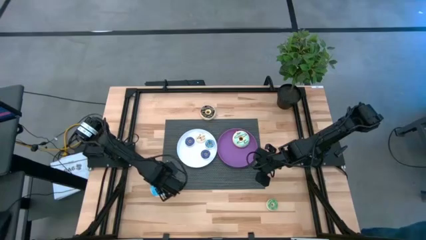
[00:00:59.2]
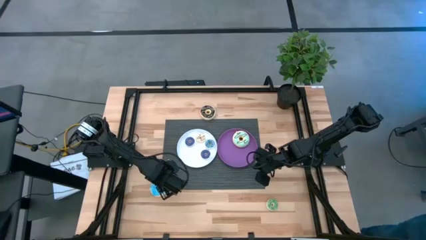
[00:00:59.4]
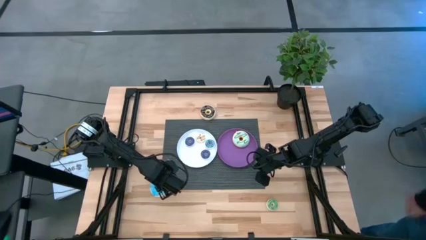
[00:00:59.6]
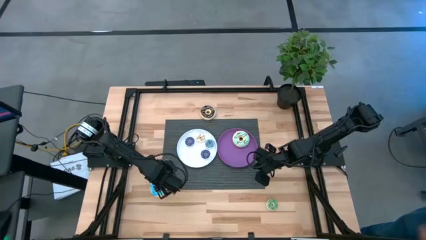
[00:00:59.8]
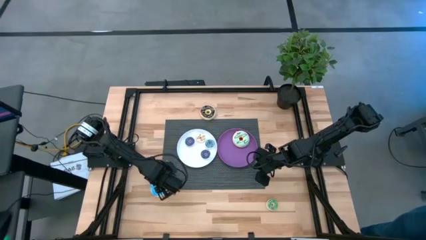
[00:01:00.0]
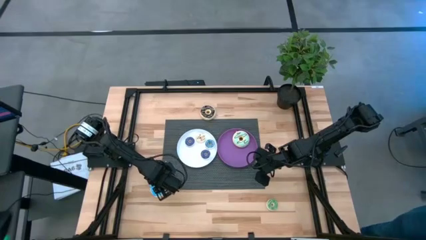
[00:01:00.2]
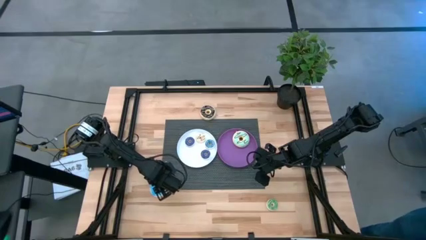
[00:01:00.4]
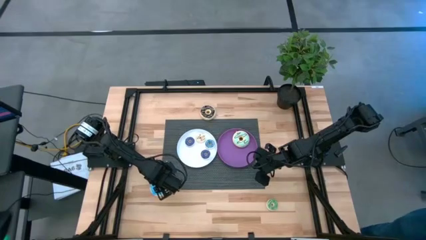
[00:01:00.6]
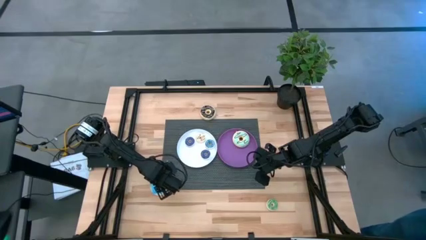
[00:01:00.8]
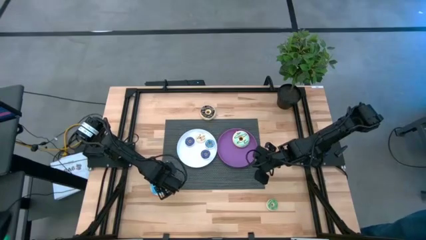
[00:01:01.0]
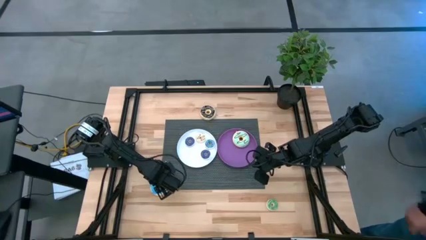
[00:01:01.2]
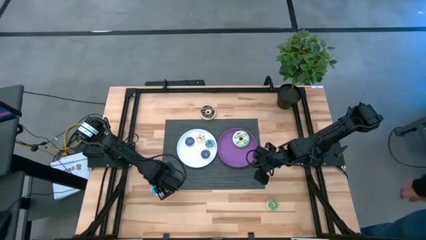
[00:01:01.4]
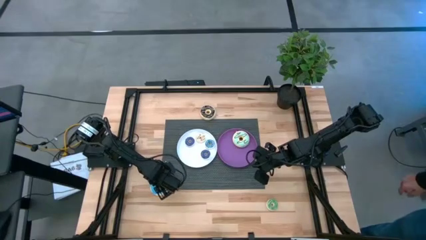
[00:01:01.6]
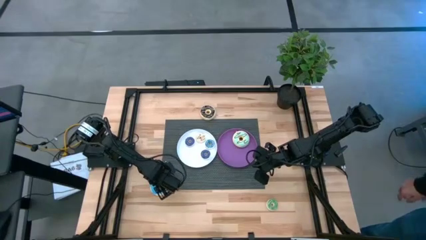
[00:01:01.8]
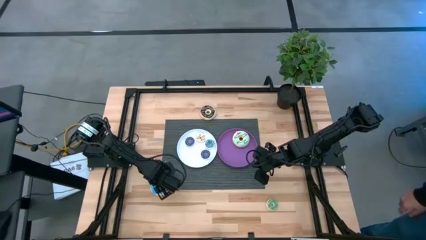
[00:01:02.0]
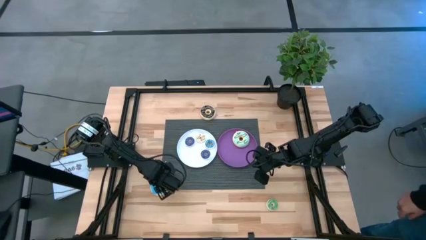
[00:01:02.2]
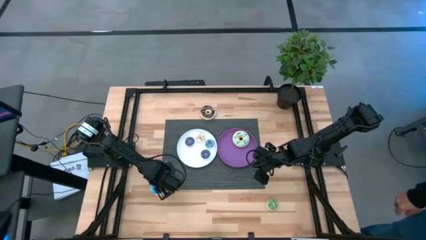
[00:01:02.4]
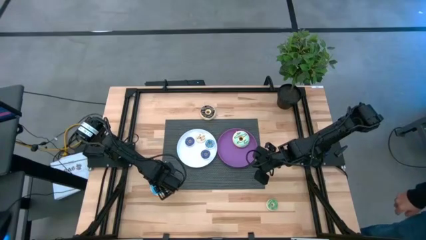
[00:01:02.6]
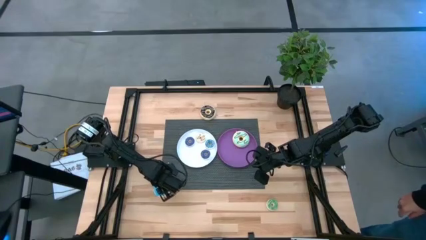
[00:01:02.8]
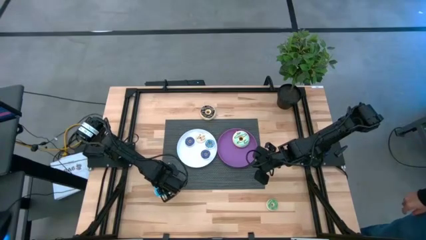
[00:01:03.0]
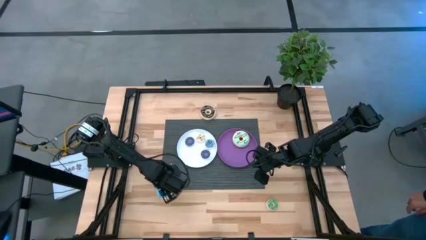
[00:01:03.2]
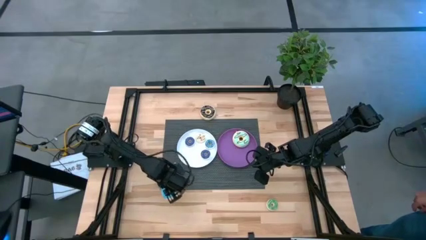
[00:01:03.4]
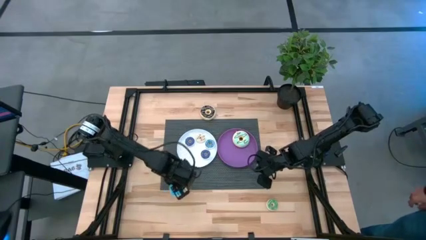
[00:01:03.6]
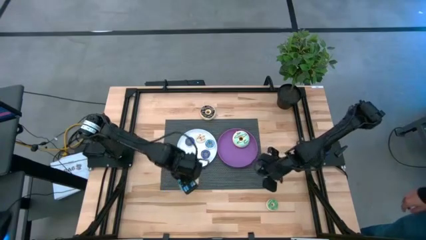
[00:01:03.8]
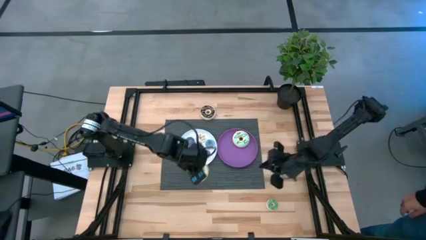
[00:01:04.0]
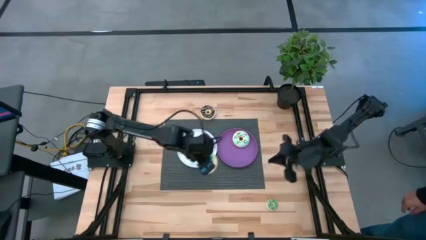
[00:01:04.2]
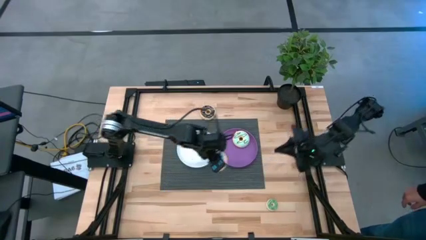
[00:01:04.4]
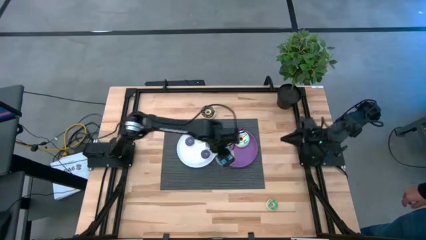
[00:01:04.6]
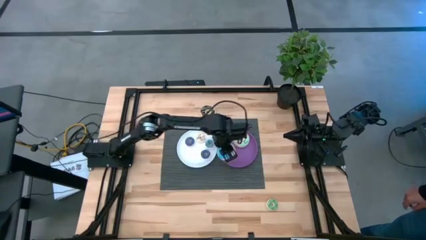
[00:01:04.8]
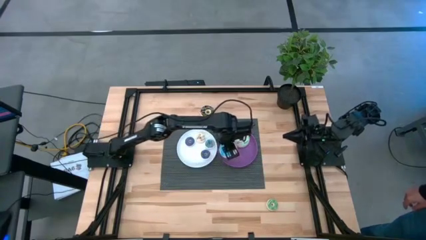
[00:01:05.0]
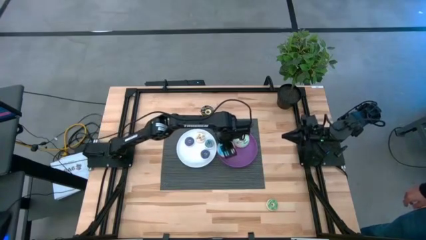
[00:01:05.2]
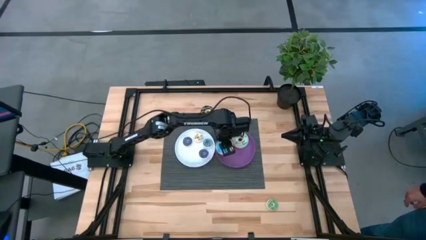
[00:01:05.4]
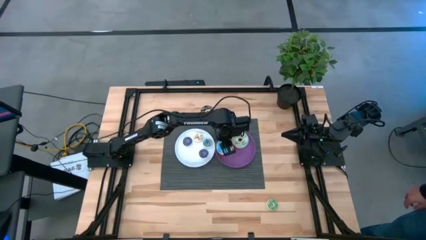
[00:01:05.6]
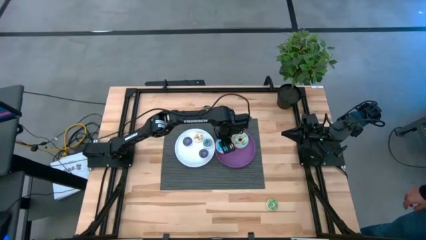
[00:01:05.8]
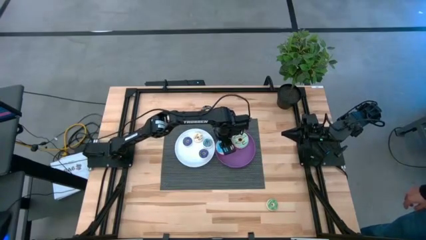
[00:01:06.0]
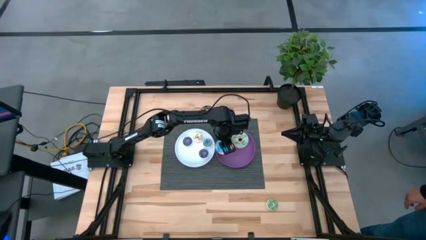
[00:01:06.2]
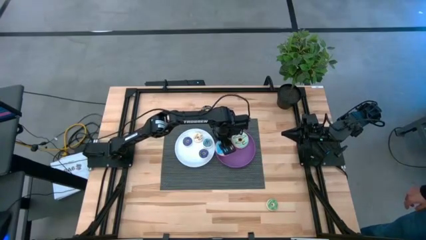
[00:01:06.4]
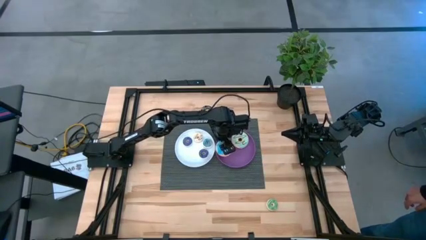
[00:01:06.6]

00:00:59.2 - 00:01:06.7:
Task: Pick & Place donuts
Put the large blue donut on the violet plate

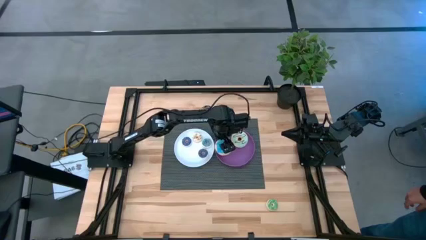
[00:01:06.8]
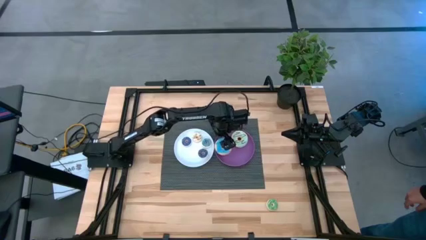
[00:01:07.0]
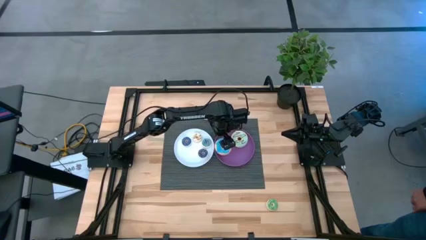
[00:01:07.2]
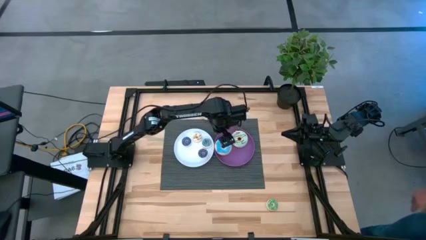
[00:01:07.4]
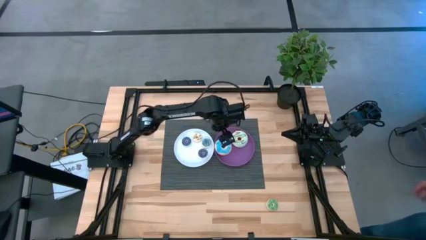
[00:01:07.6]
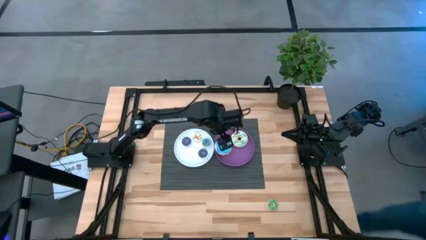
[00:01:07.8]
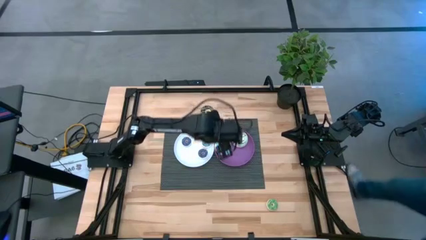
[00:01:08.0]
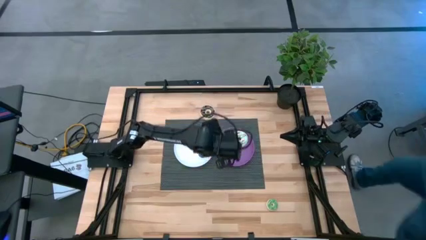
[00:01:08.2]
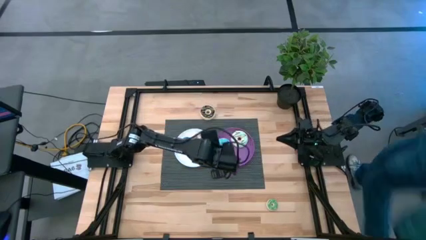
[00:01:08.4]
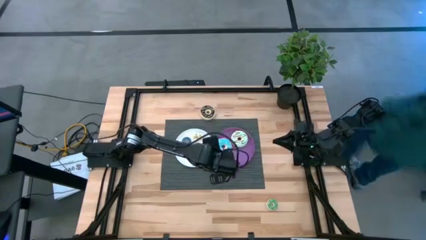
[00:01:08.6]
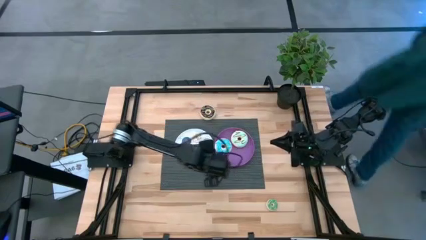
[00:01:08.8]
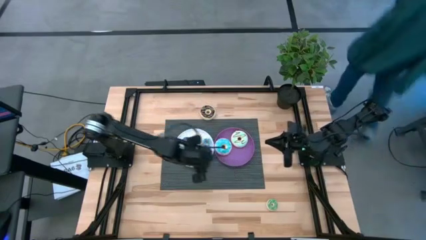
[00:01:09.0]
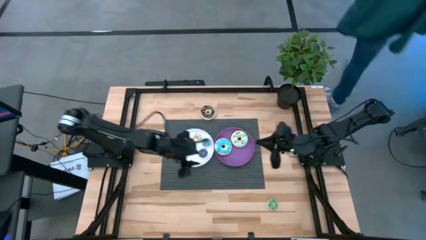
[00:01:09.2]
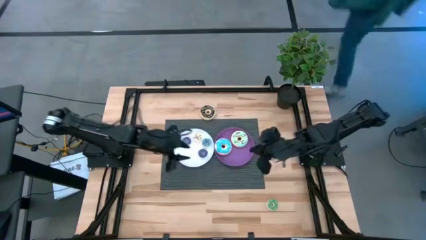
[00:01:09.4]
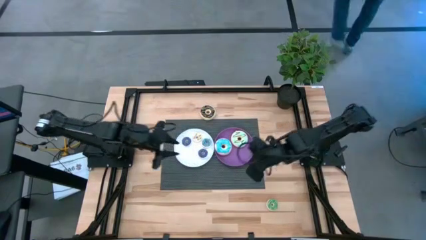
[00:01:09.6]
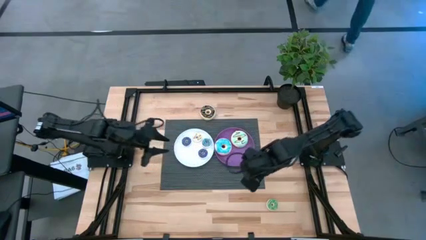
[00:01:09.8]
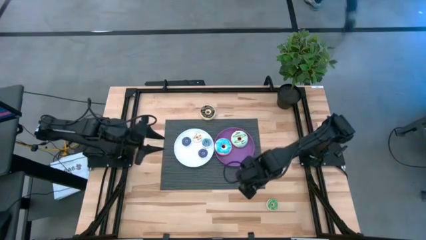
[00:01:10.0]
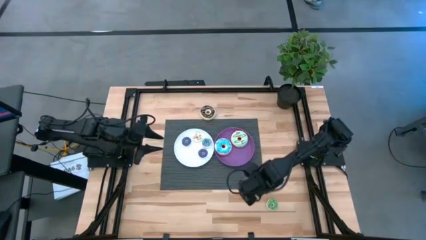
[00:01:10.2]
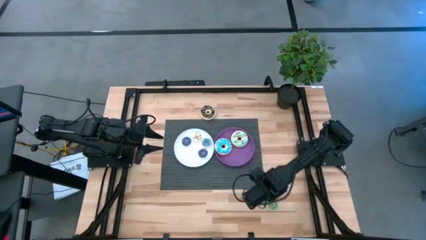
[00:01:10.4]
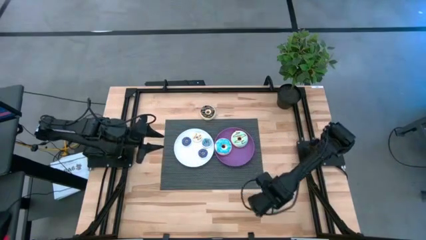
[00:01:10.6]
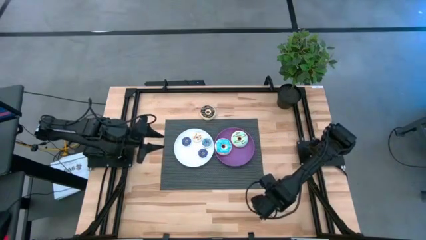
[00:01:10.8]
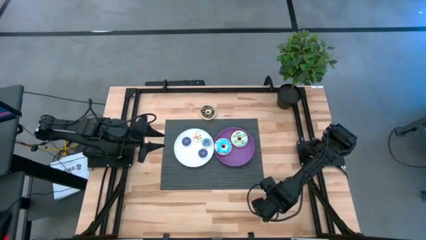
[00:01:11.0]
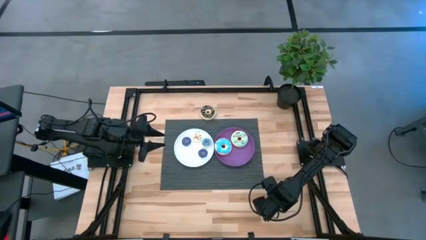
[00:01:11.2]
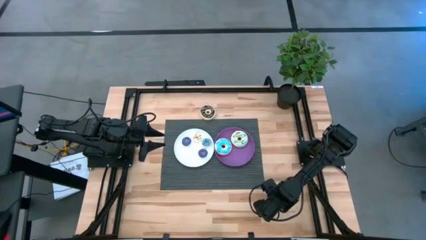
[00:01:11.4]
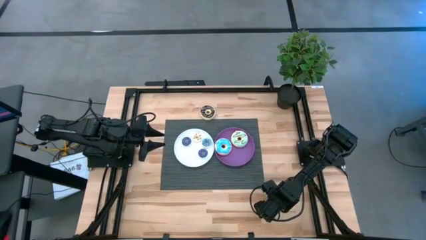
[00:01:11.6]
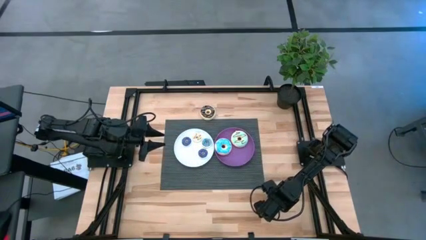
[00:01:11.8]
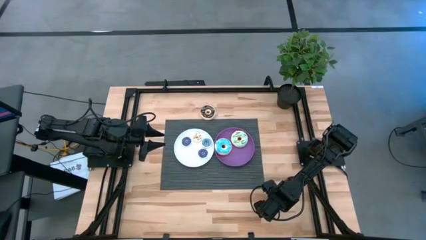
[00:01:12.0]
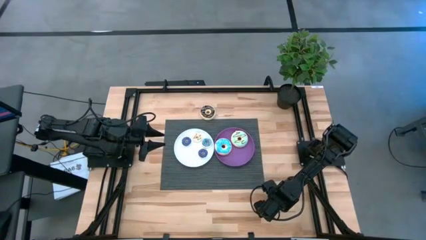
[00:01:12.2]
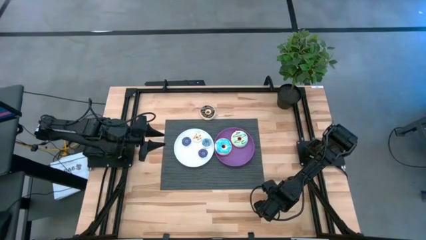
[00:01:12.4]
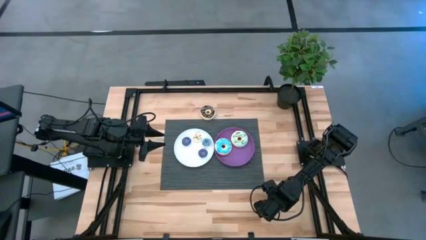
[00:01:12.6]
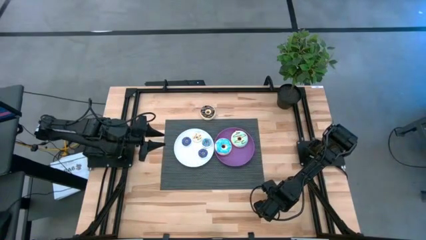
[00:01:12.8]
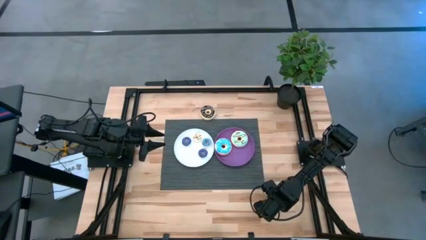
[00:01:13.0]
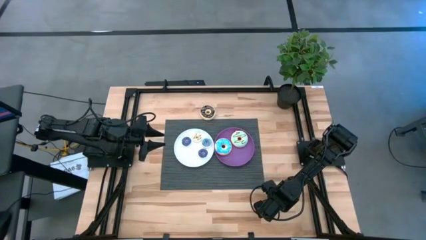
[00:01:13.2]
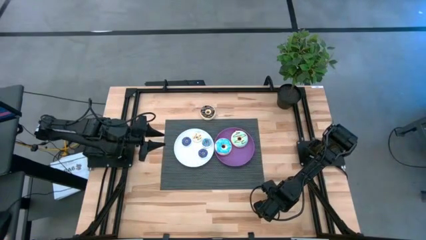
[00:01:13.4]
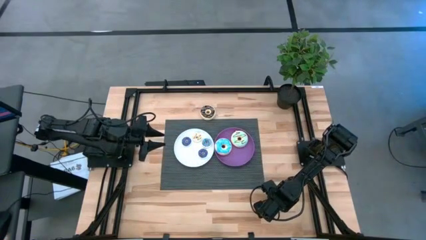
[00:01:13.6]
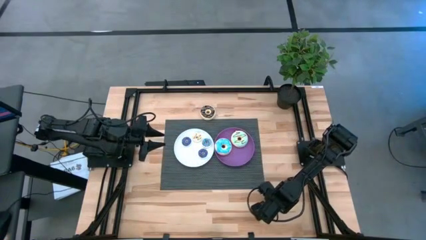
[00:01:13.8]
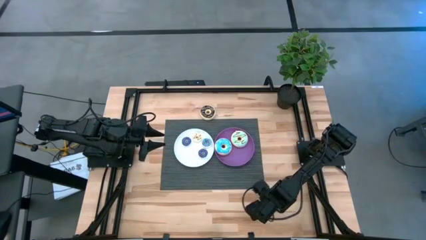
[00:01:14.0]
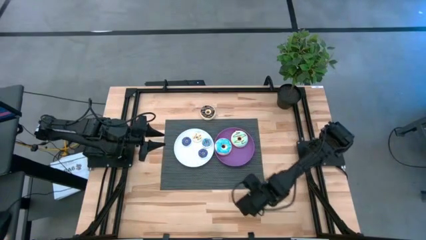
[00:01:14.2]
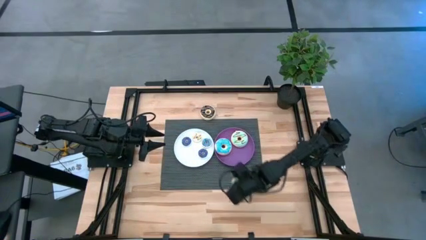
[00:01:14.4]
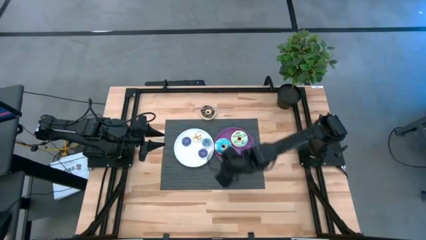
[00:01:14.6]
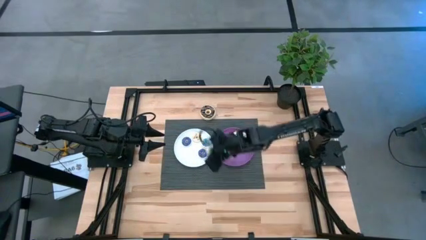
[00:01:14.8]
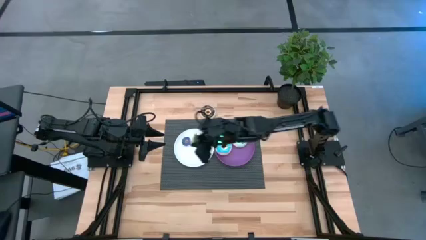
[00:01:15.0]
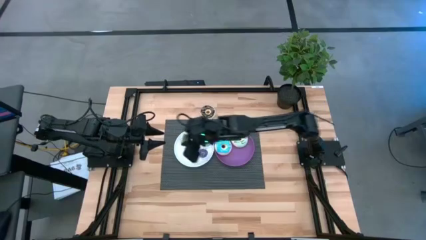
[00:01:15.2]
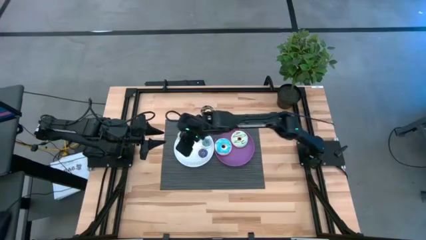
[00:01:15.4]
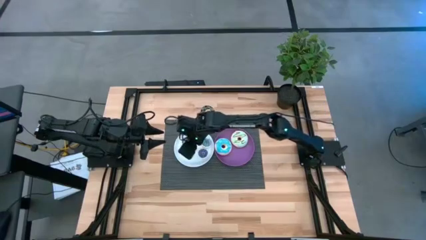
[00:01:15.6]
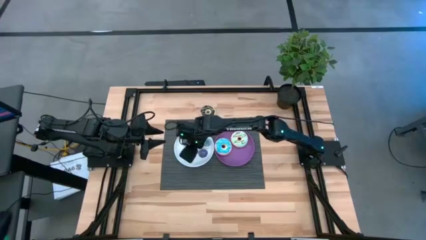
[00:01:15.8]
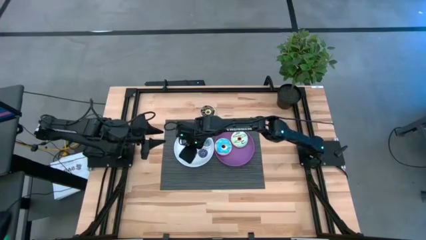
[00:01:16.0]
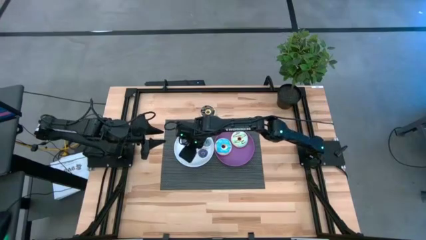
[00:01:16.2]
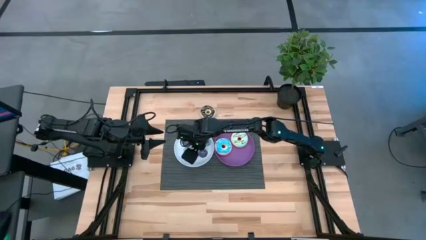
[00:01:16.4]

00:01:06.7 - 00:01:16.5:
Put the small green donut on the white plate
